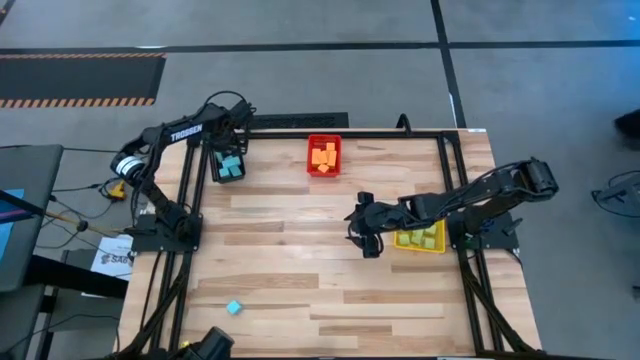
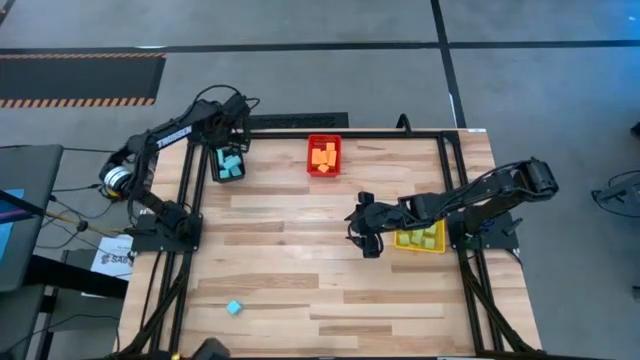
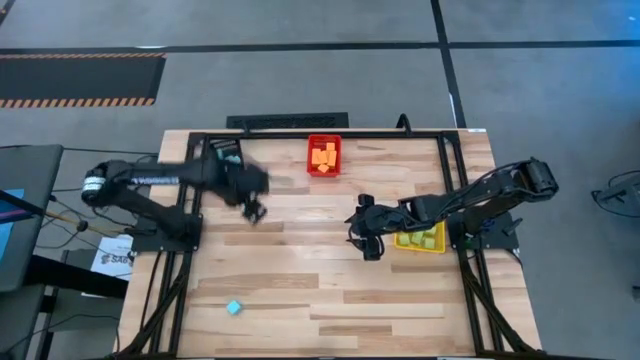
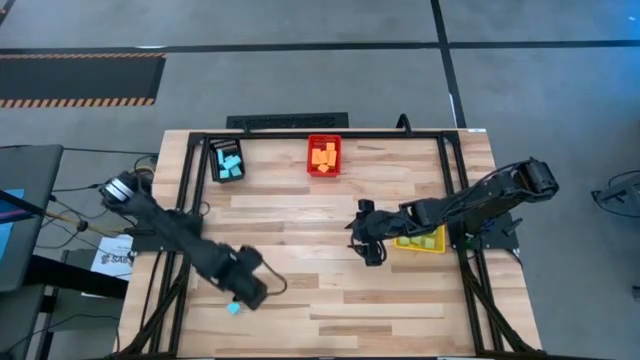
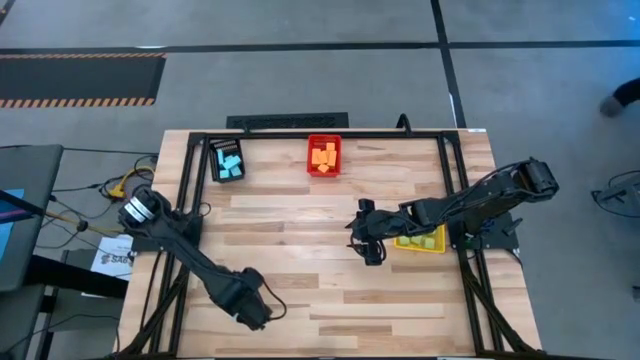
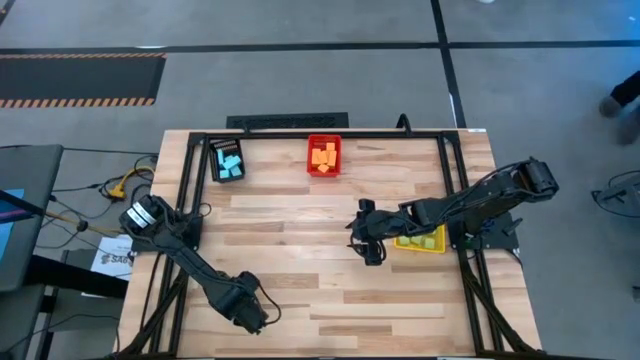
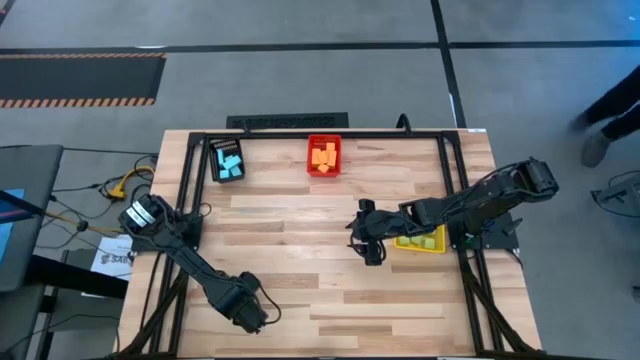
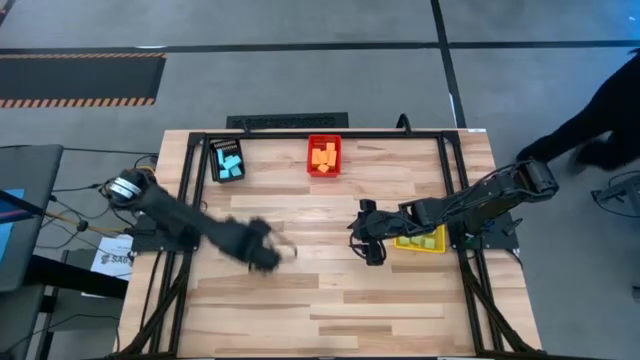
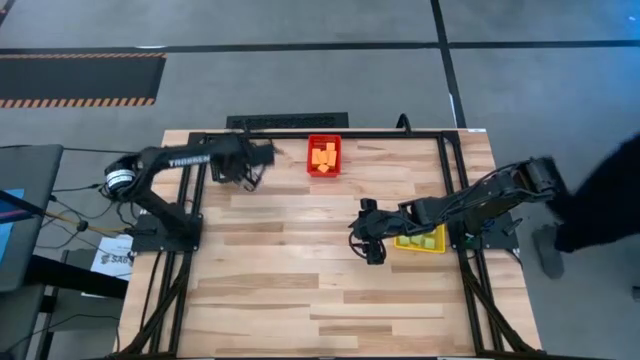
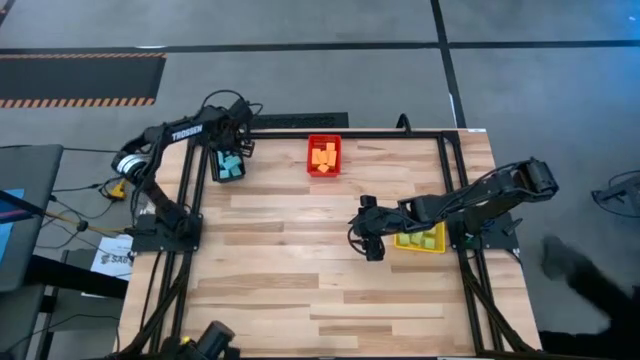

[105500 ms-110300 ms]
Task: Sort & place blocks by color
Put the blue block into the black bin

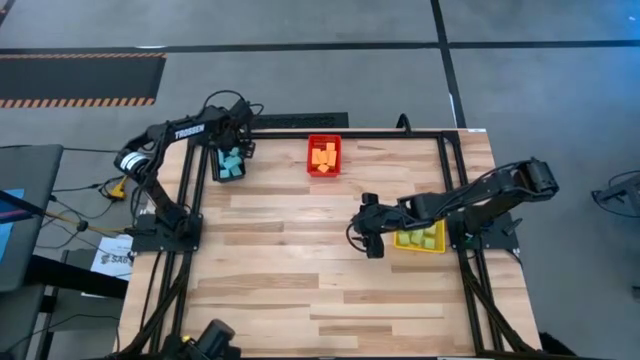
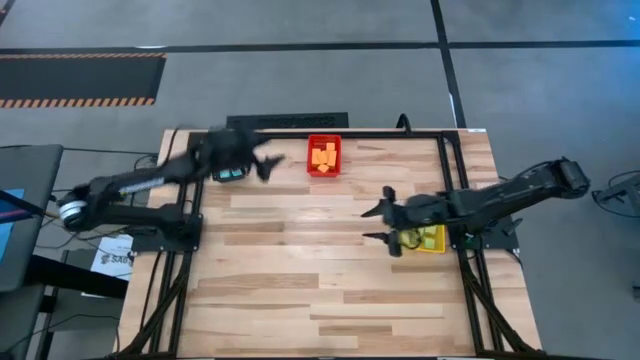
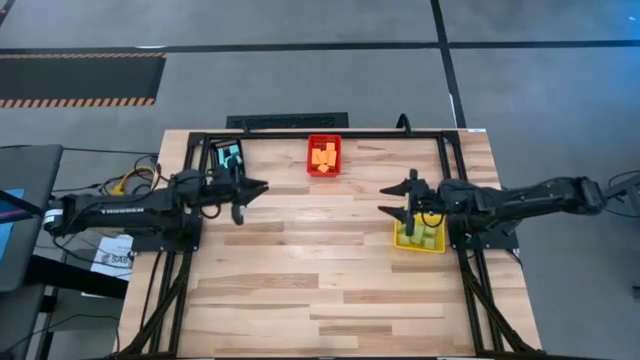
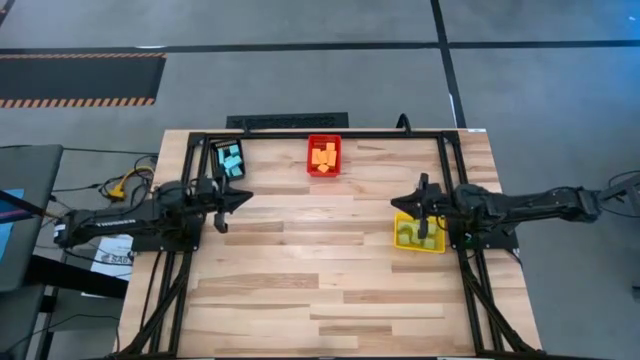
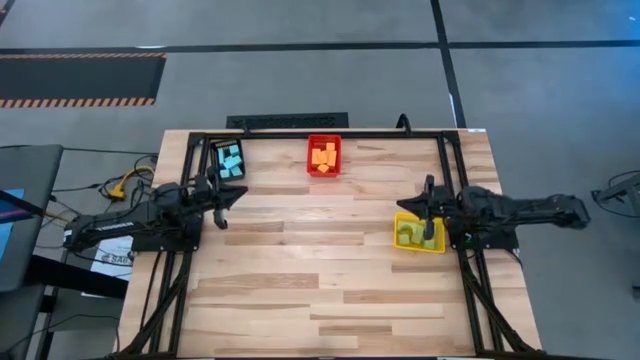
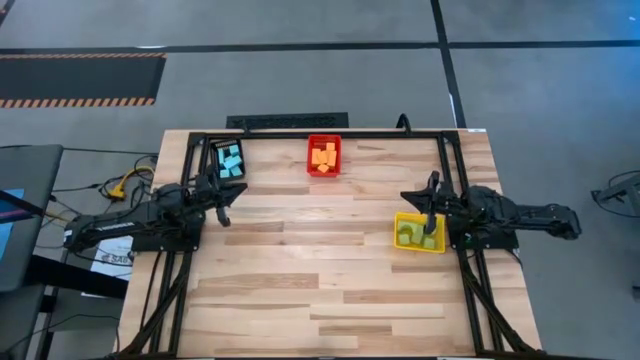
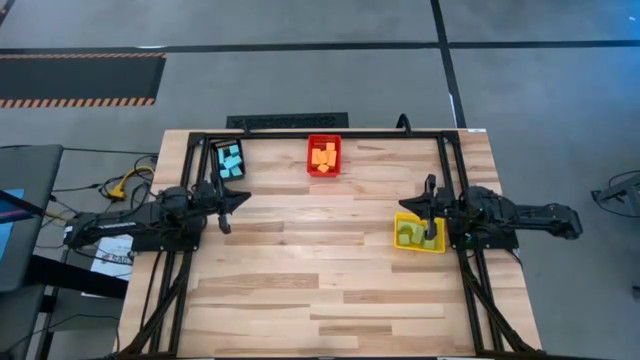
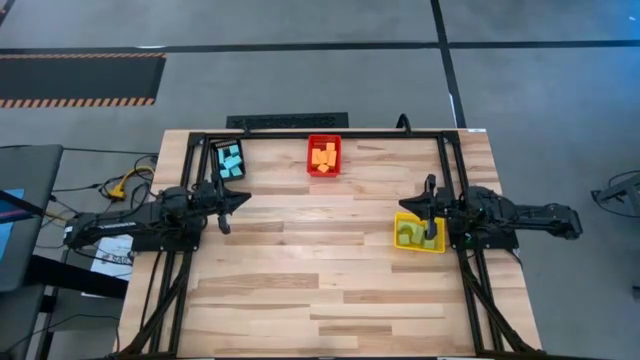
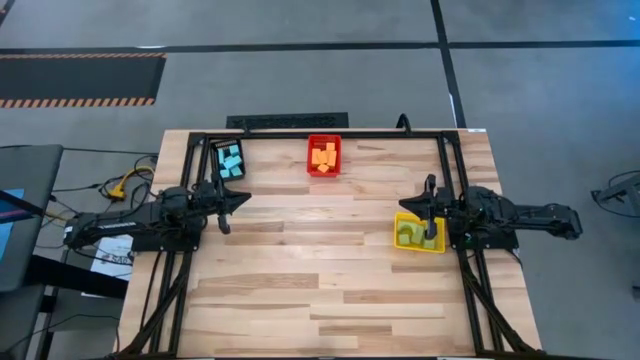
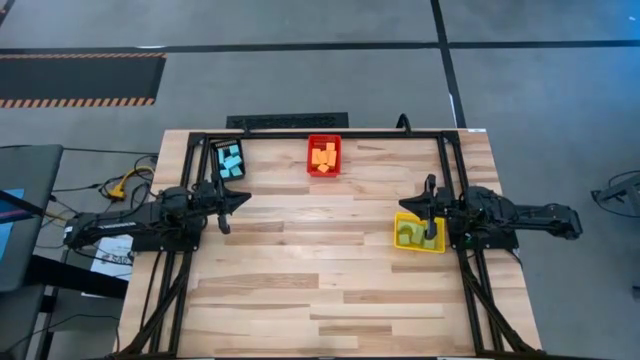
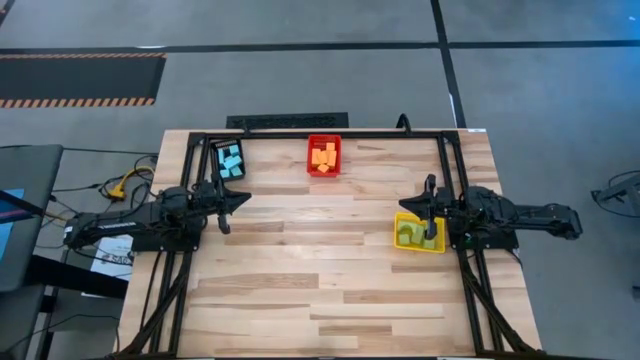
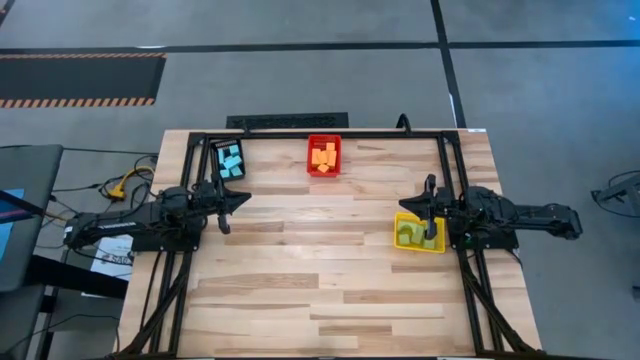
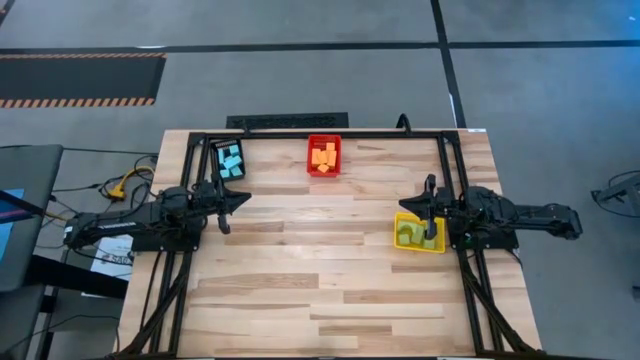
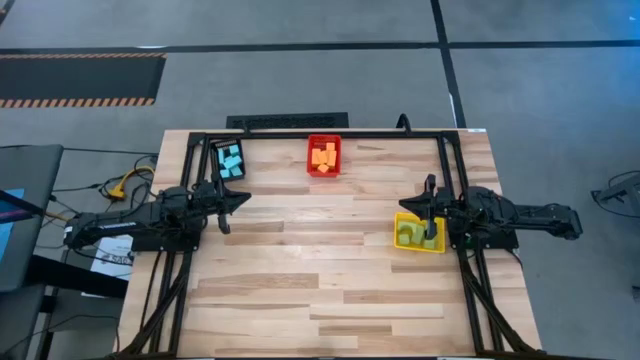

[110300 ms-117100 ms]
Return to Home Position

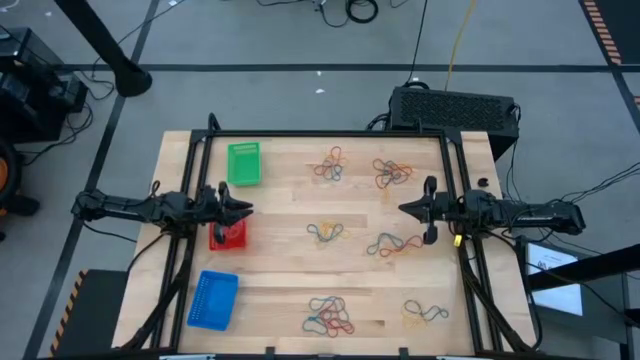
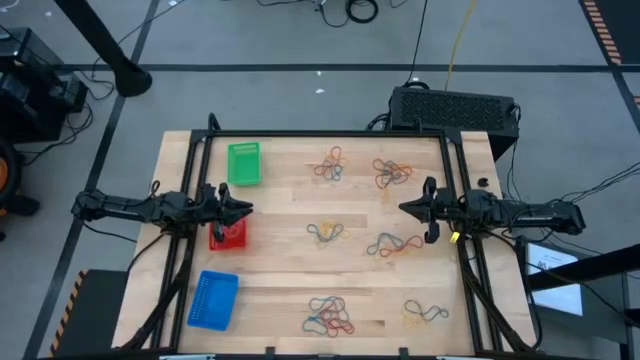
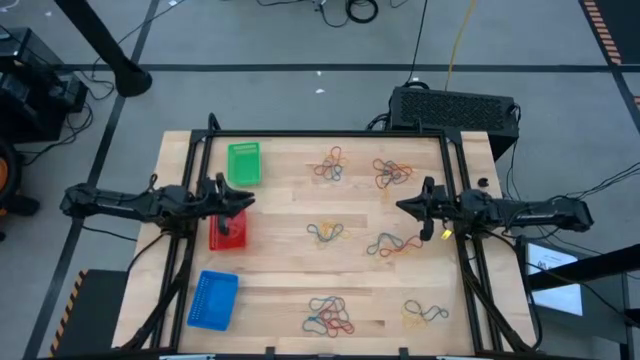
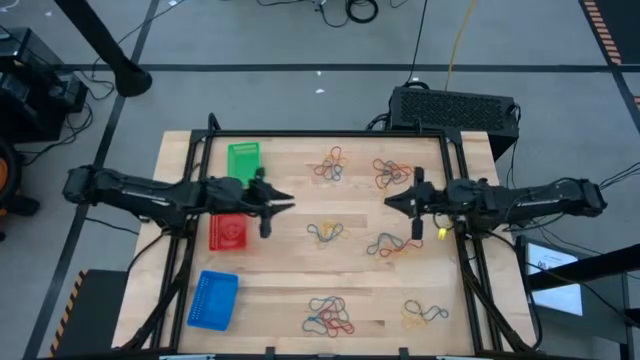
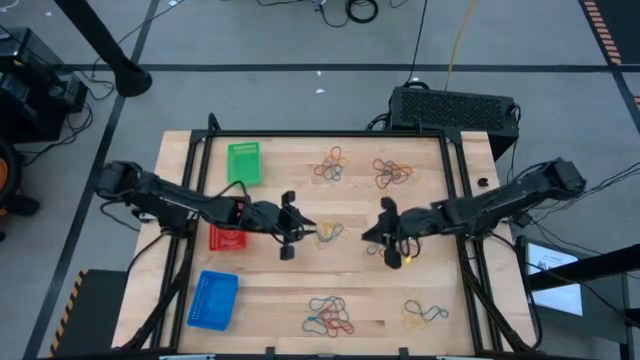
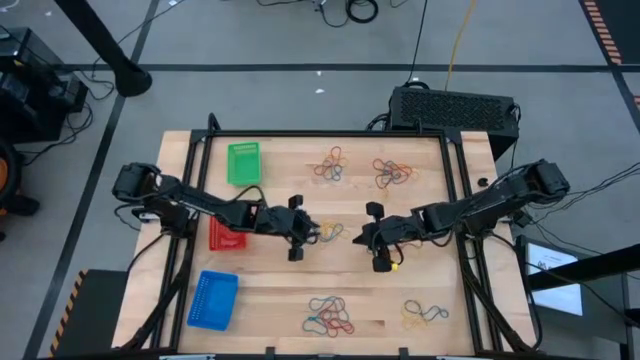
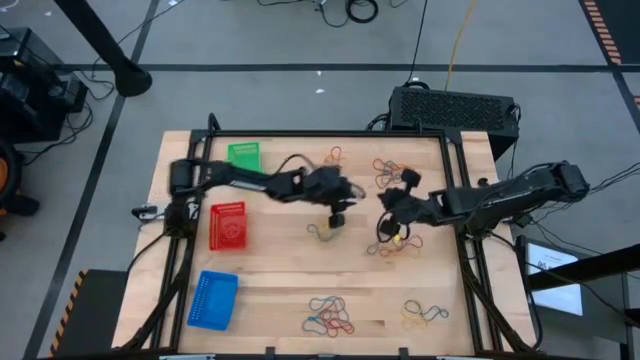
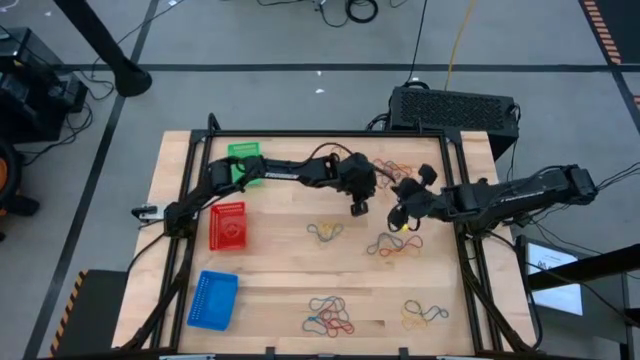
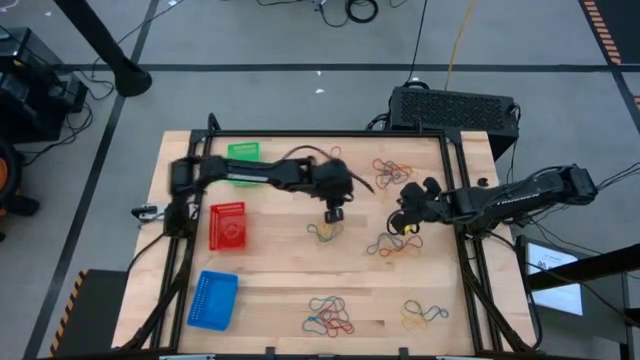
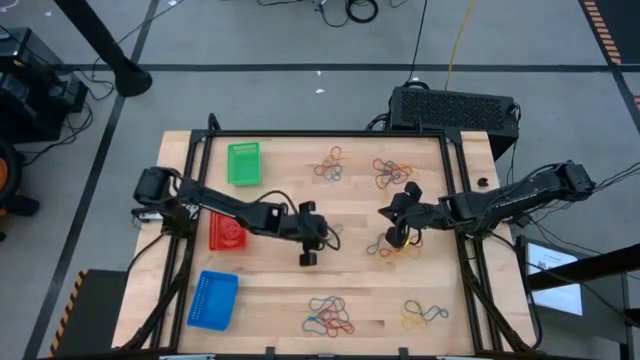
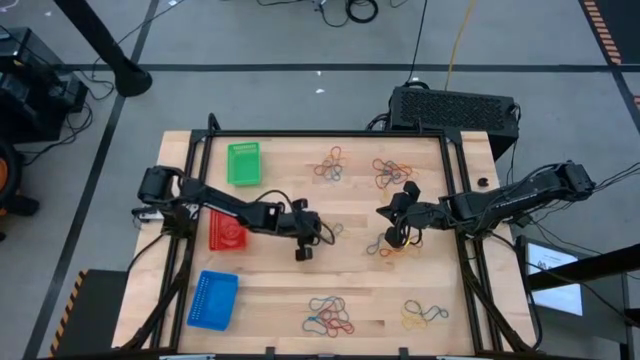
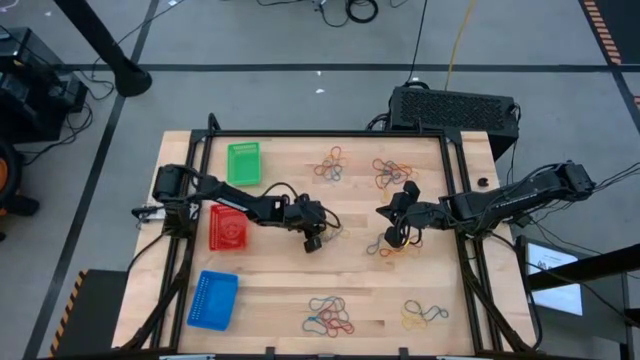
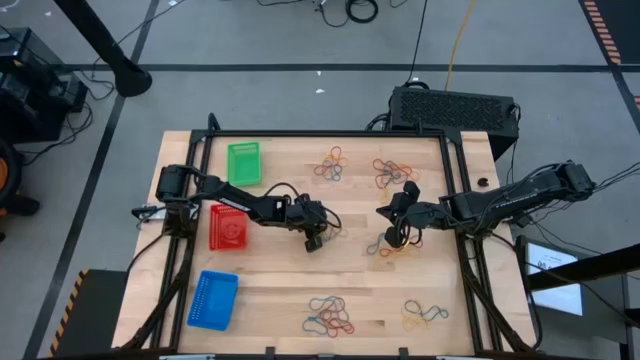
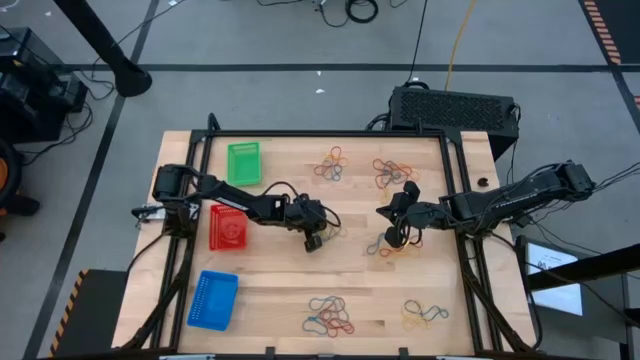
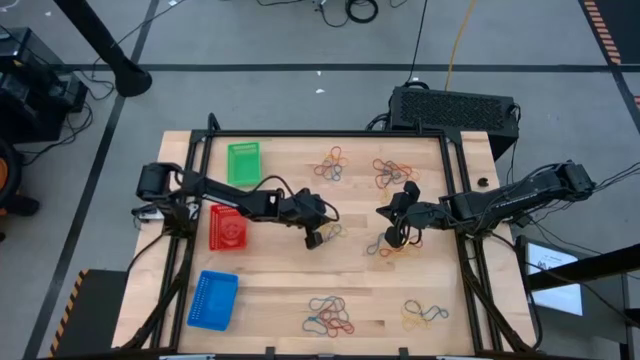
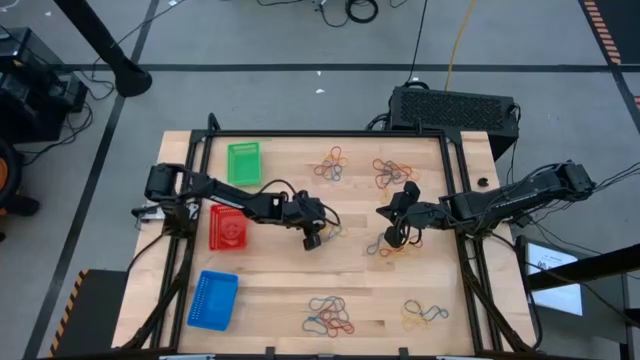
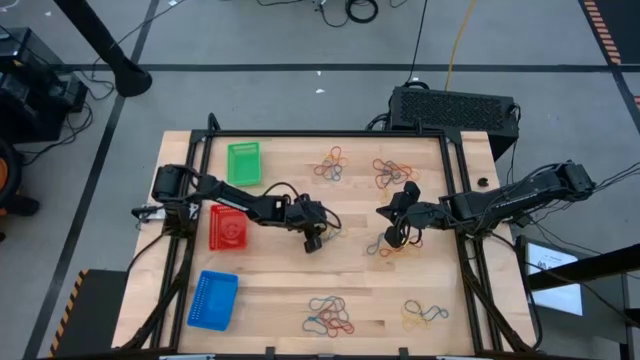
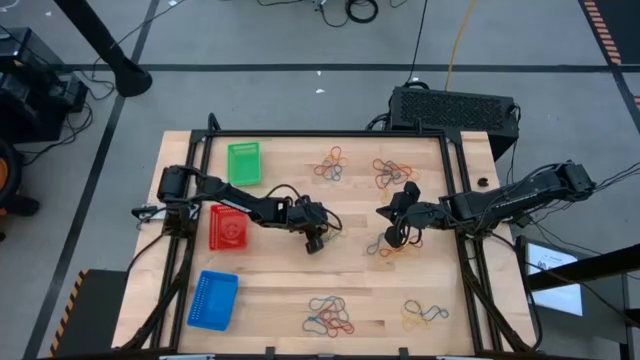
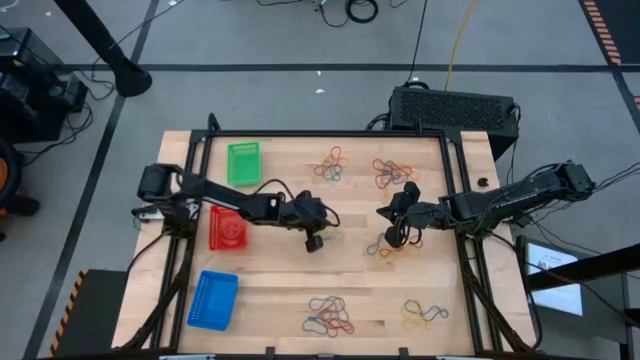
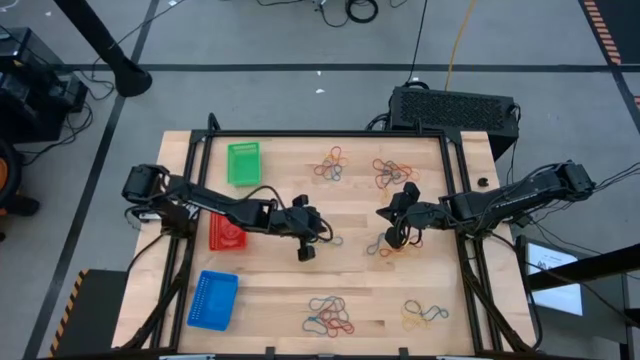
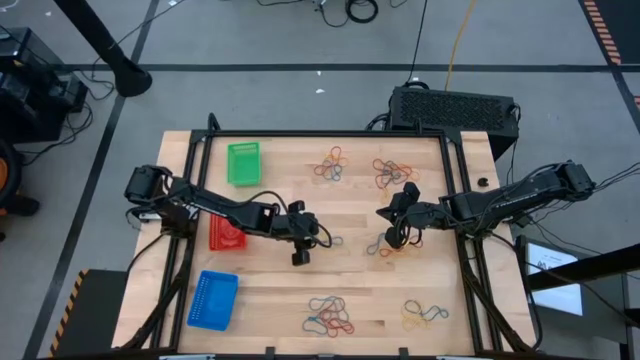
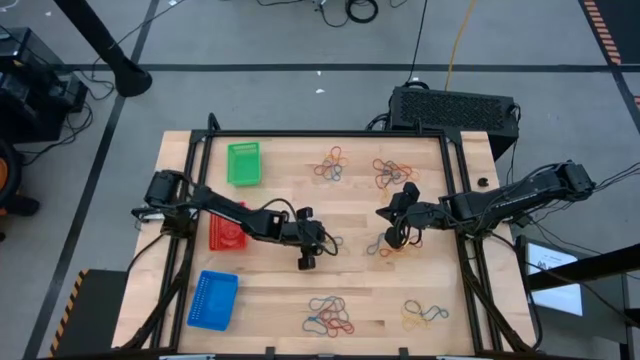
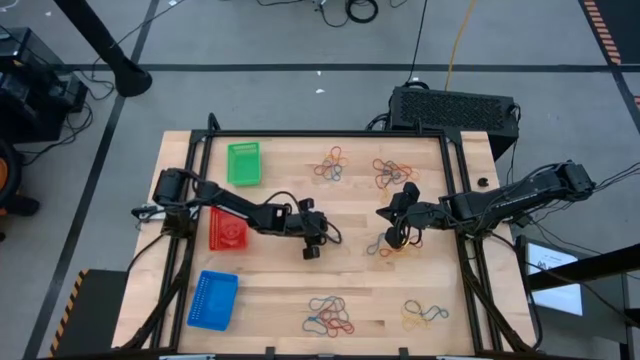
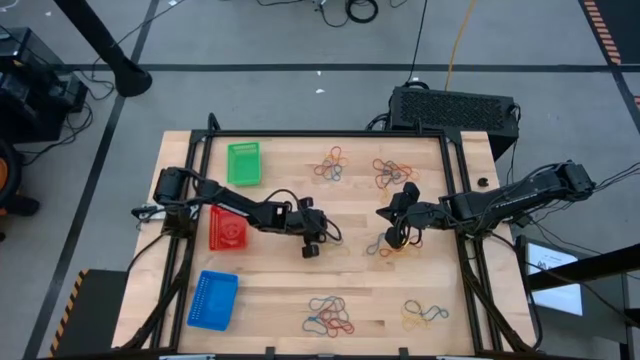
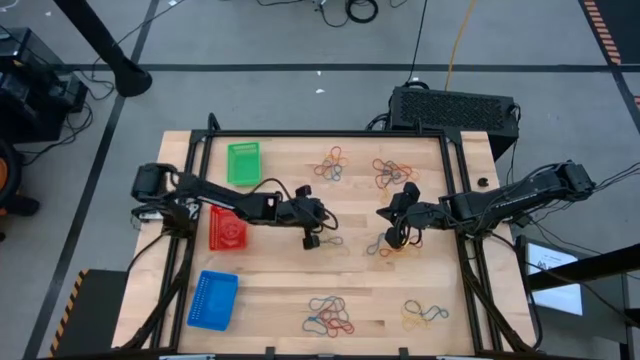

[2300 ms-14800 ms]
Task: Sort rubber bands into baskets
Put the yellow rubber band into the green bin
